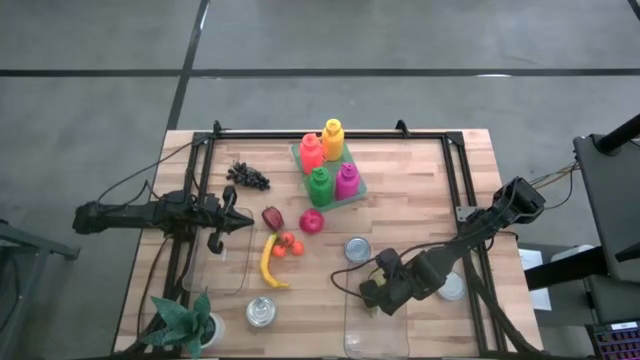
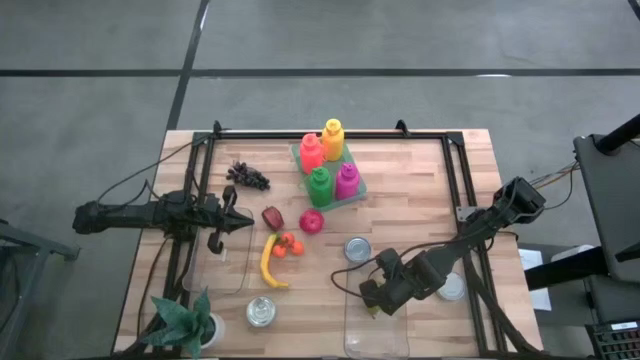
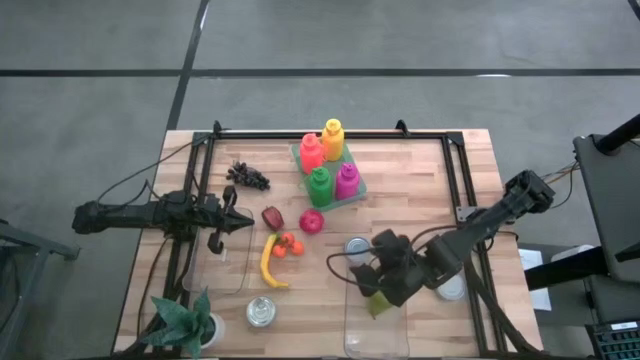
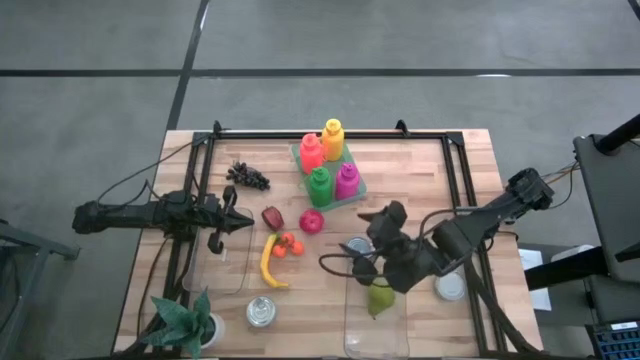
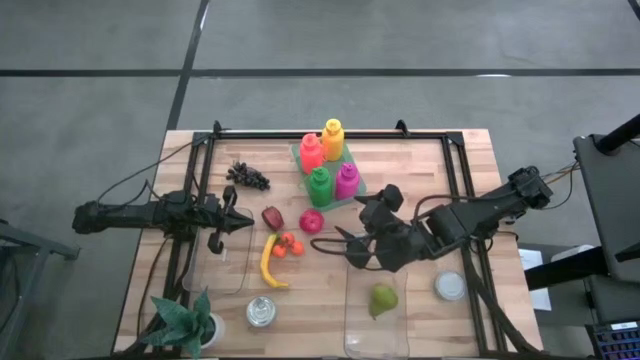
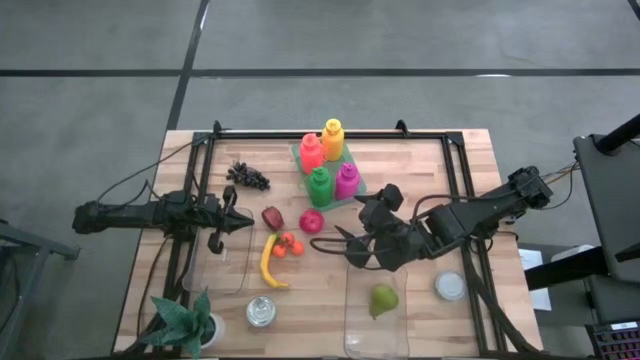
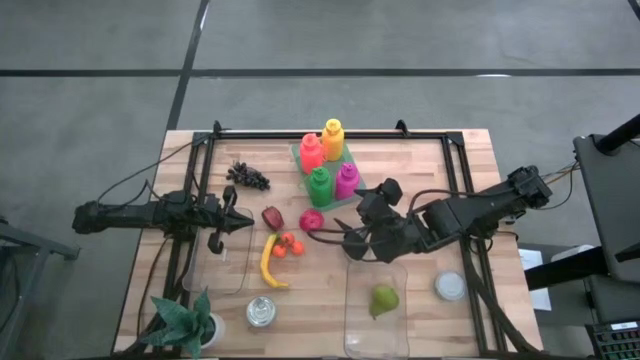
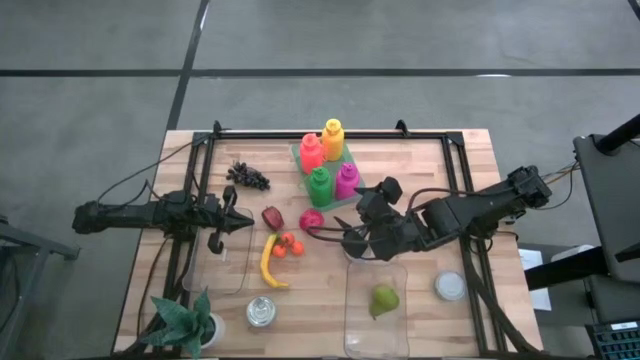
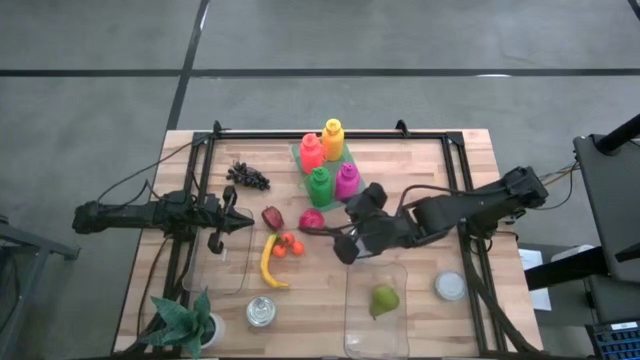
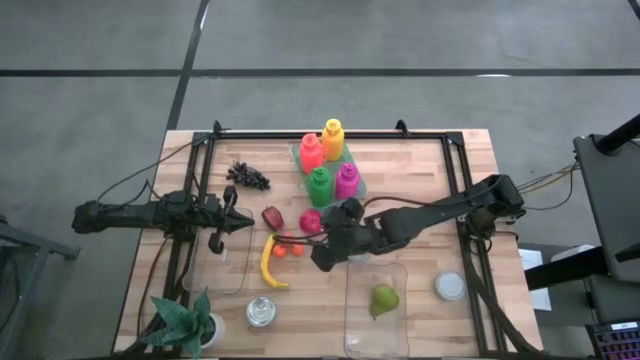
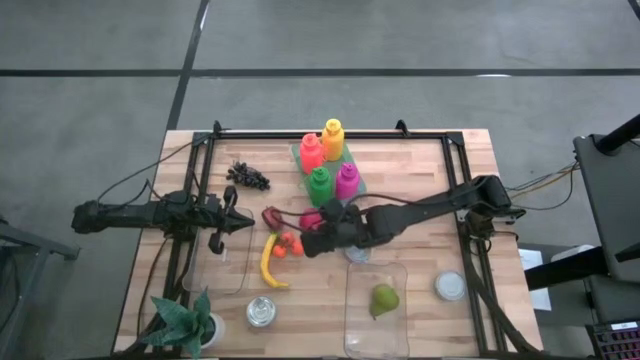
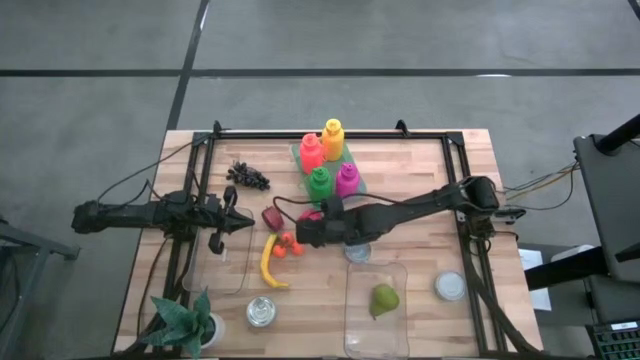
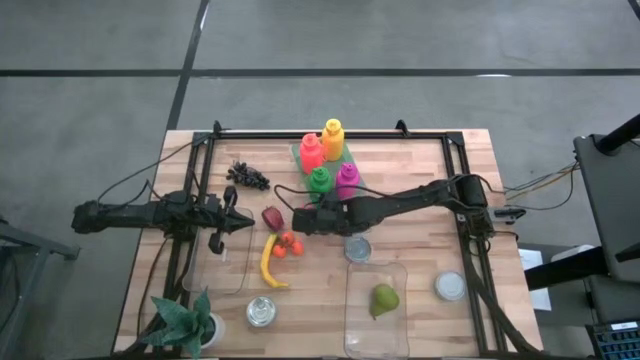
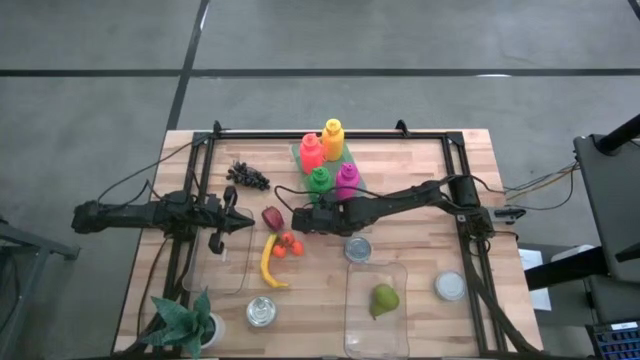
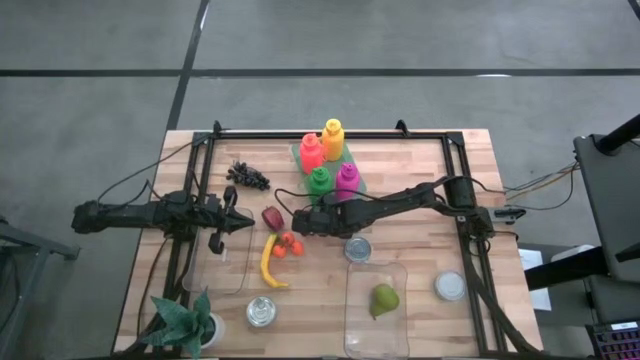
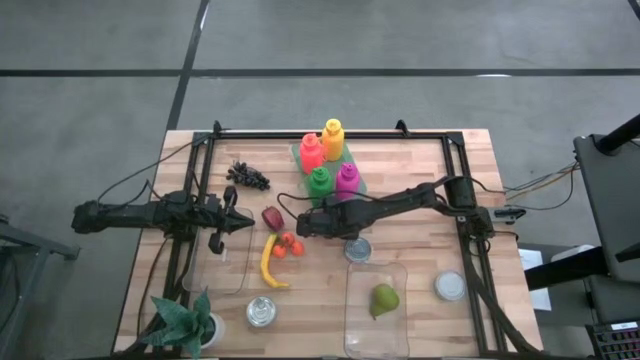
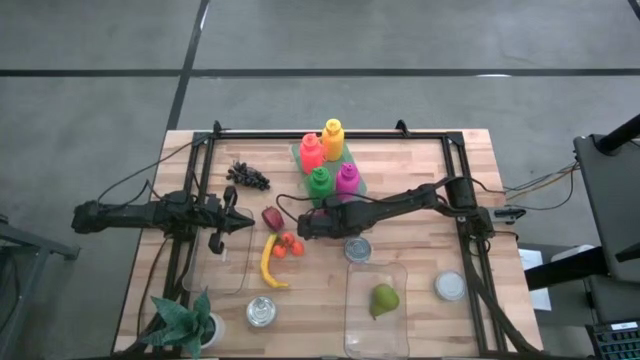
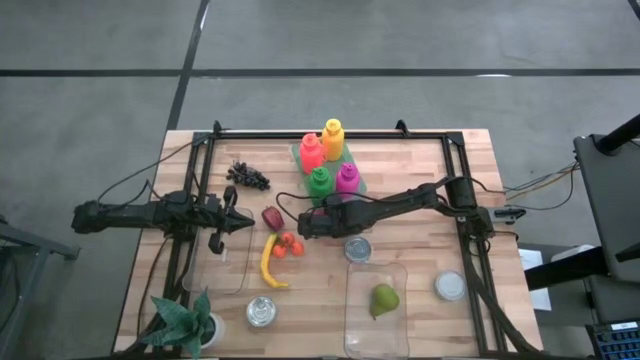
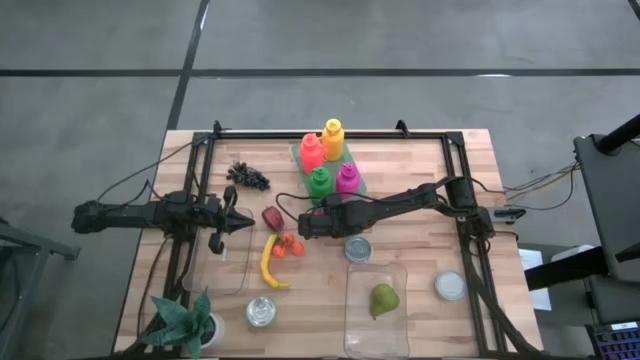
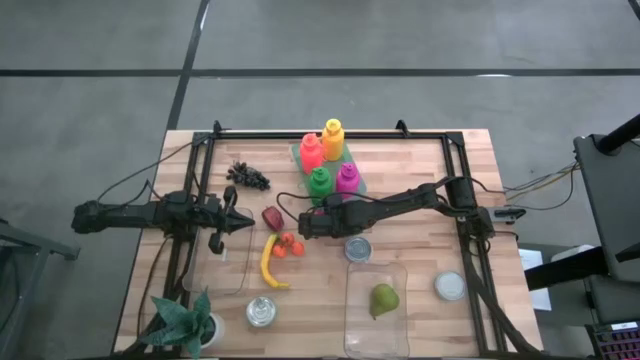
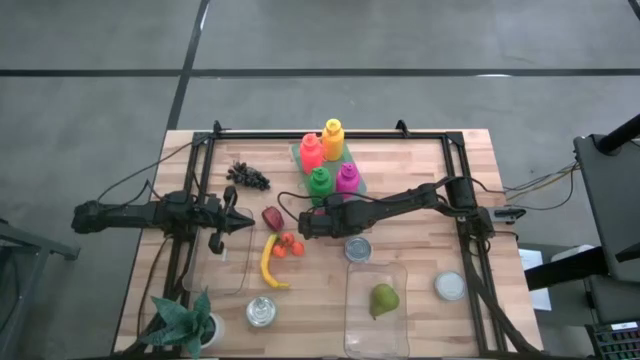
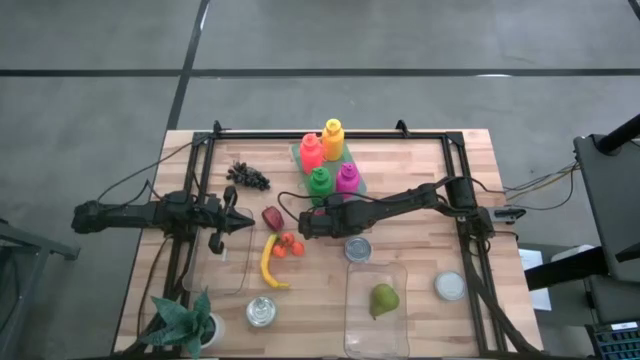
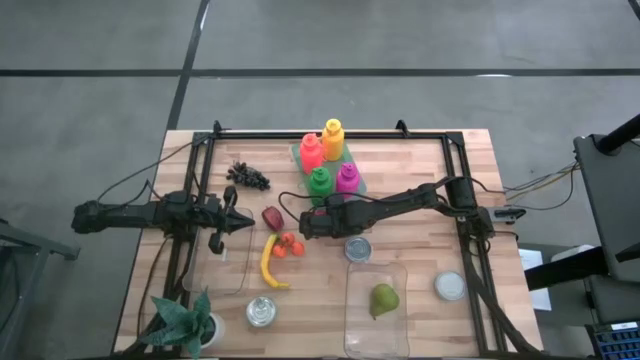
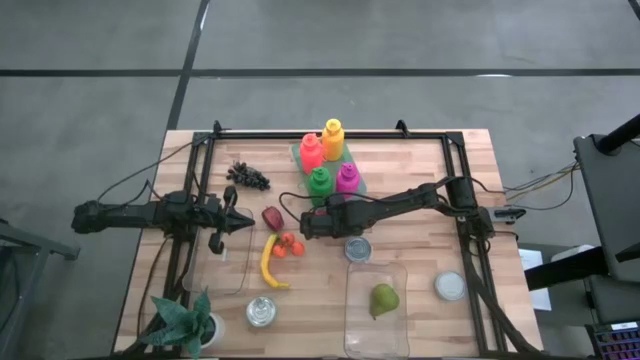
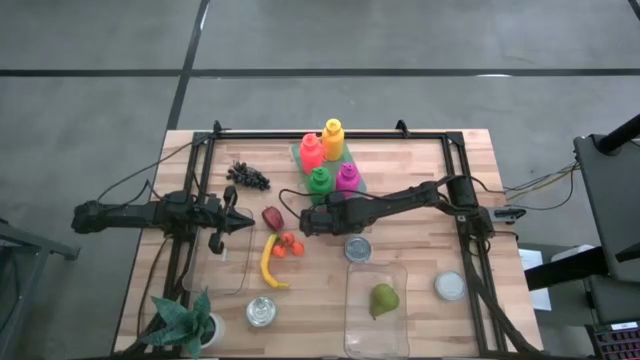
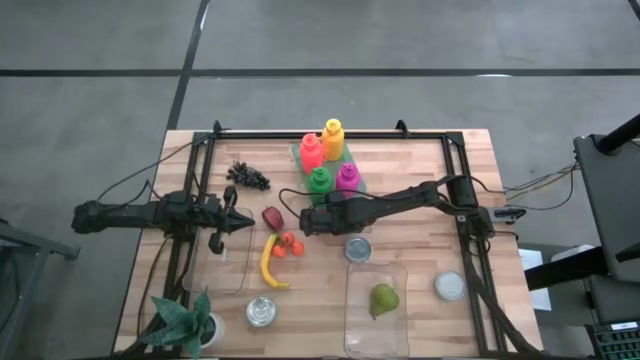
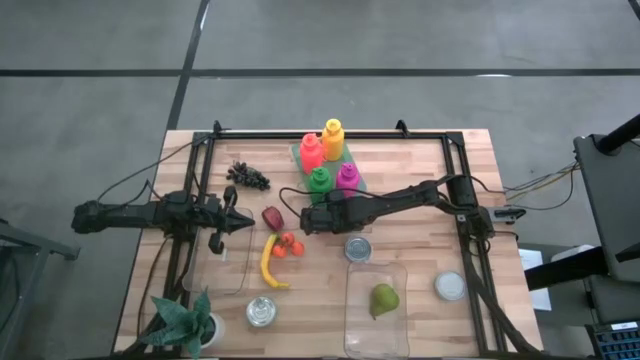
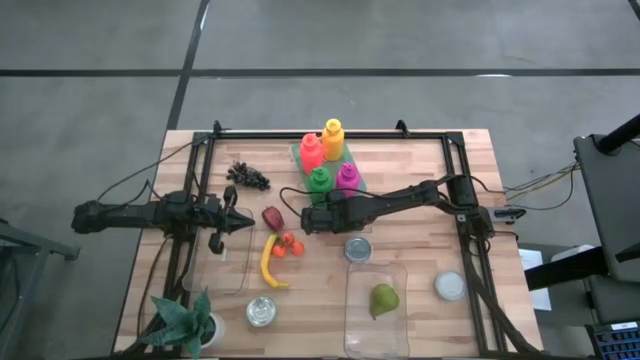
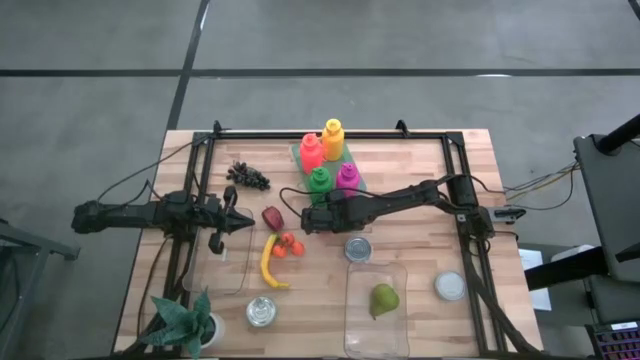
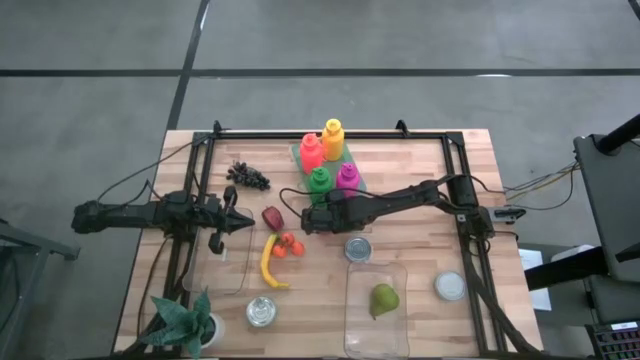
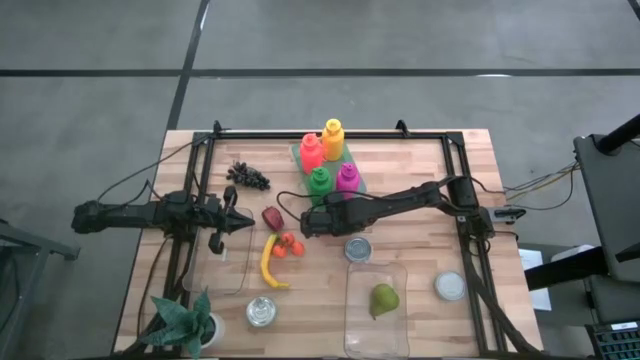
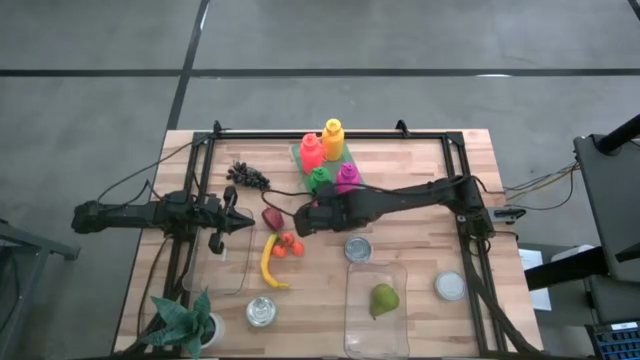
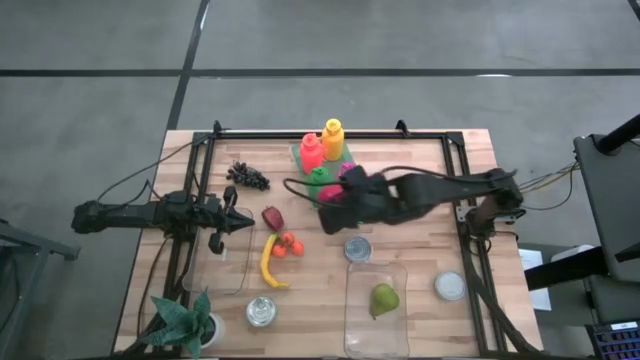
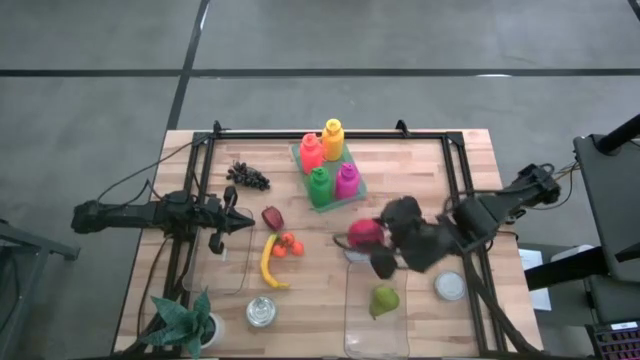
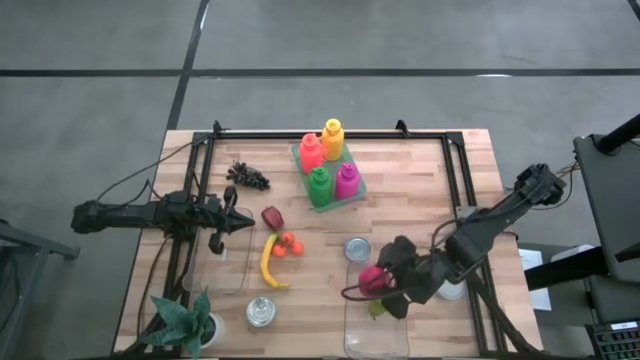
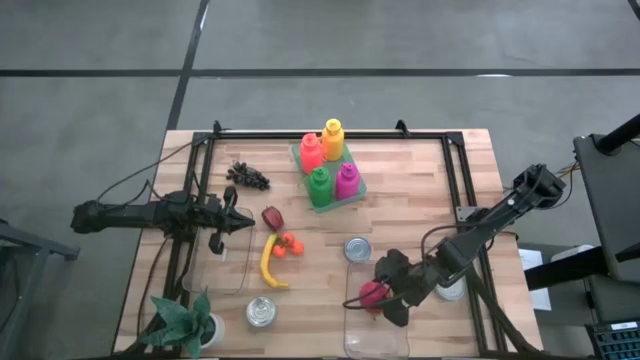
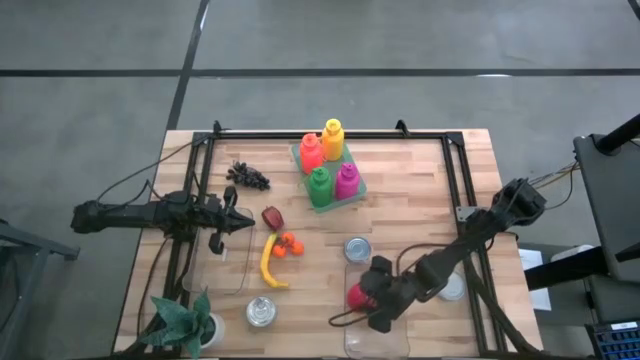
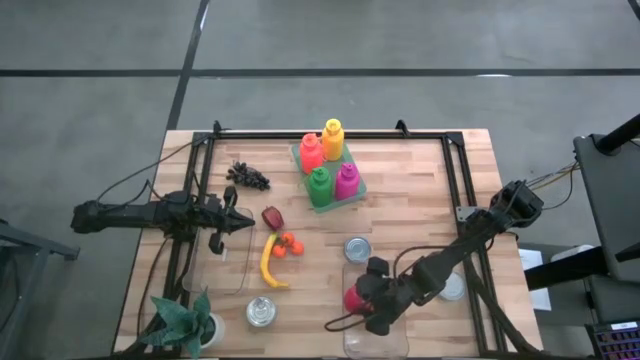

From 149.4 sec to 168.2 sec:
Task: Pick & Place Food Item
Put the red apple into the bottom transparent bin

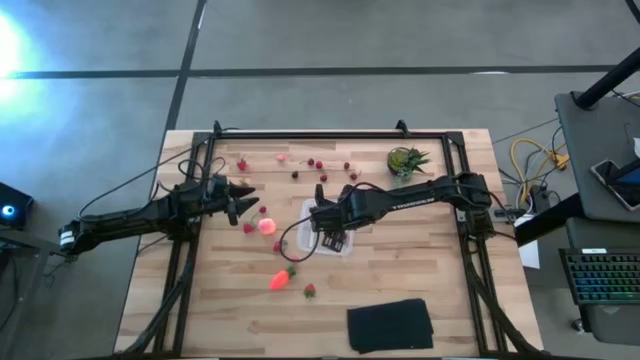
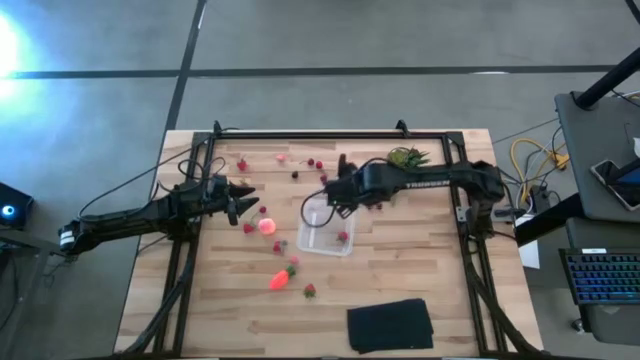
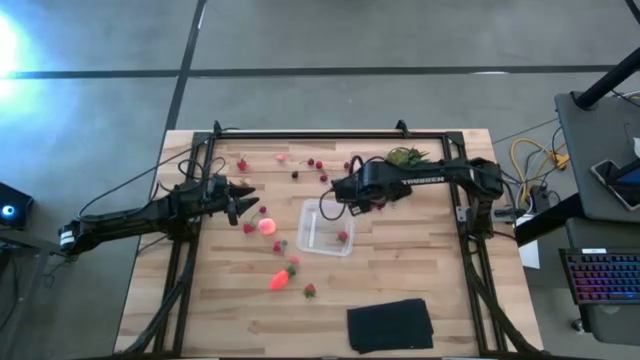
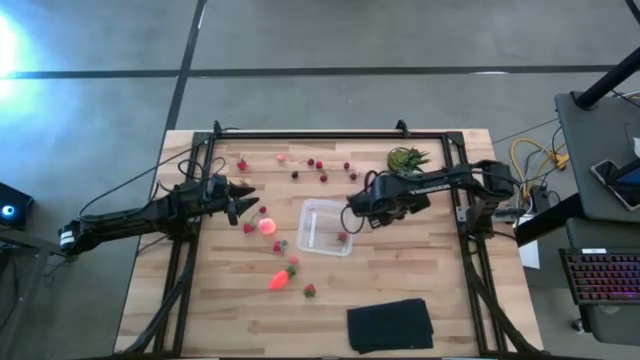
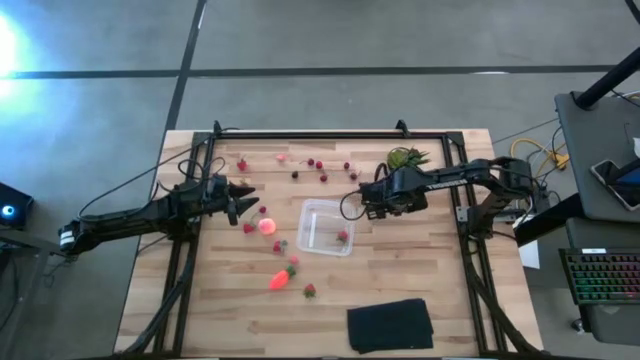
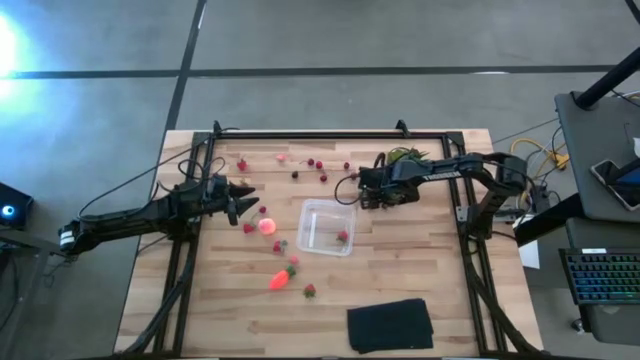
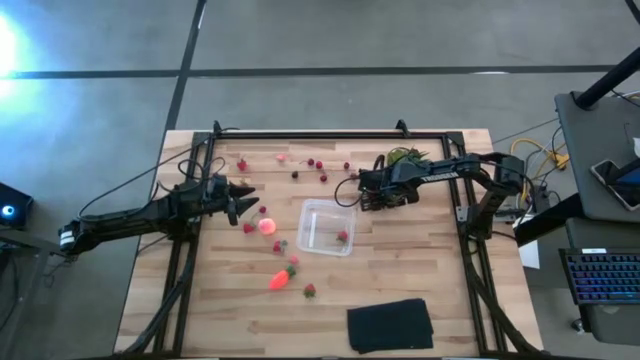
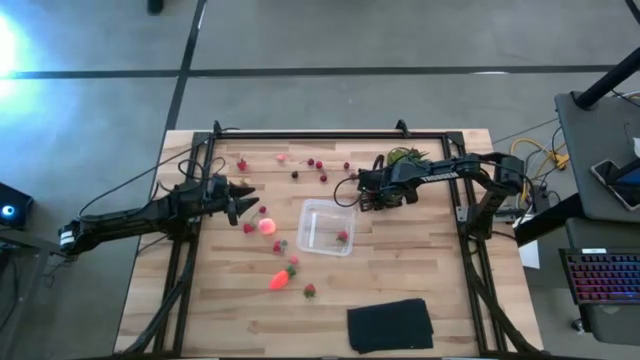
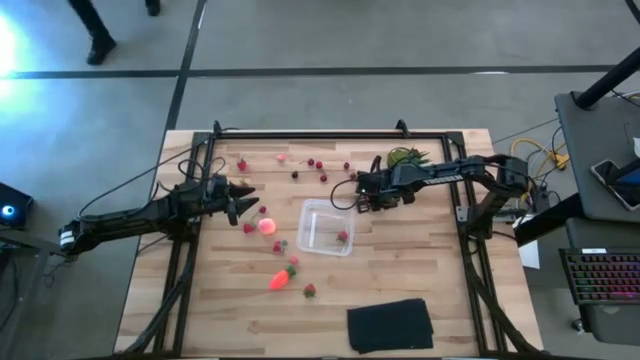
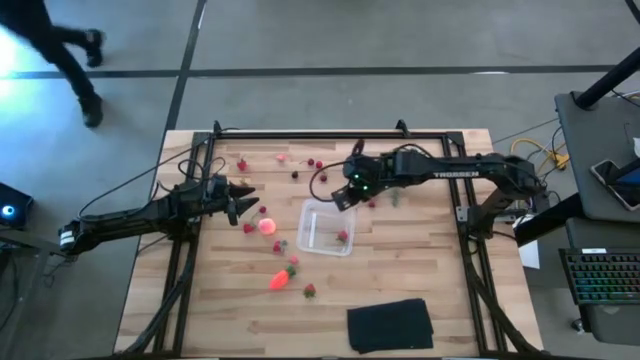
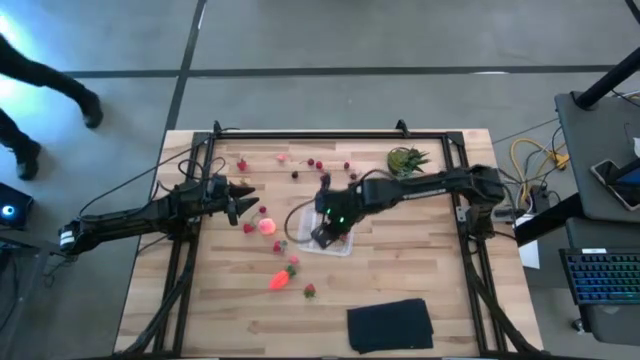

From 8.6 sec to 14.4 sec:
Task: Pick and placing Produce into tupperware
Put the red cherry into the transparent bin
